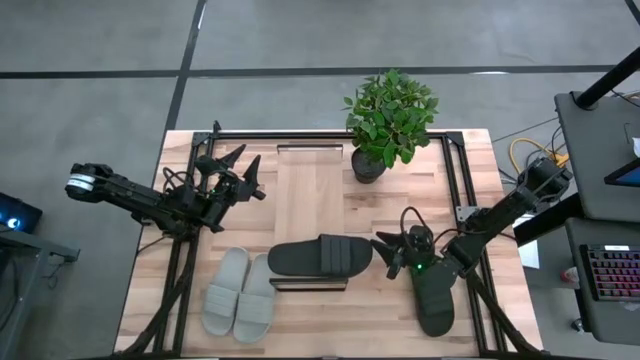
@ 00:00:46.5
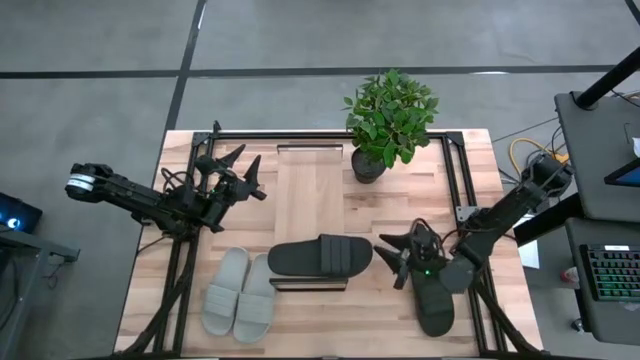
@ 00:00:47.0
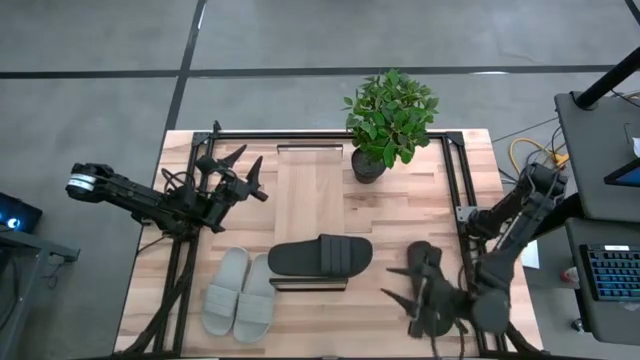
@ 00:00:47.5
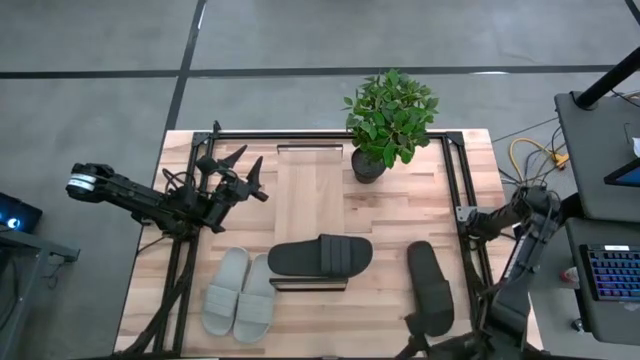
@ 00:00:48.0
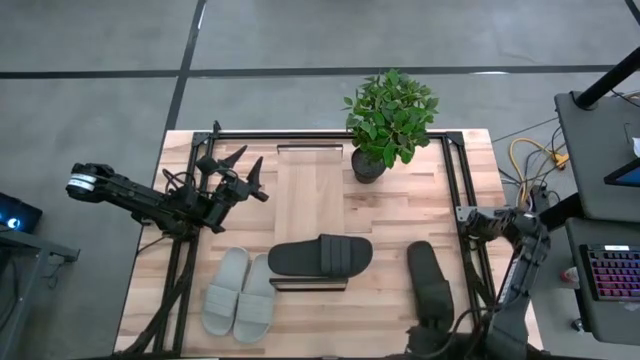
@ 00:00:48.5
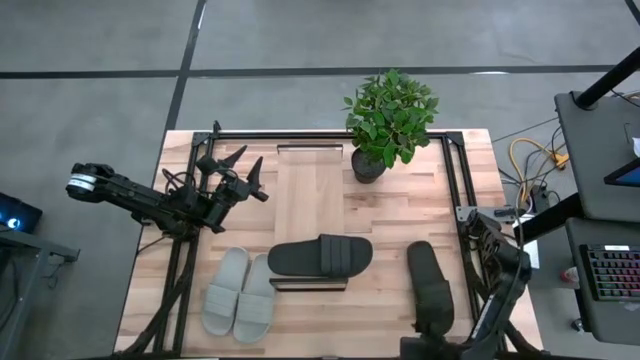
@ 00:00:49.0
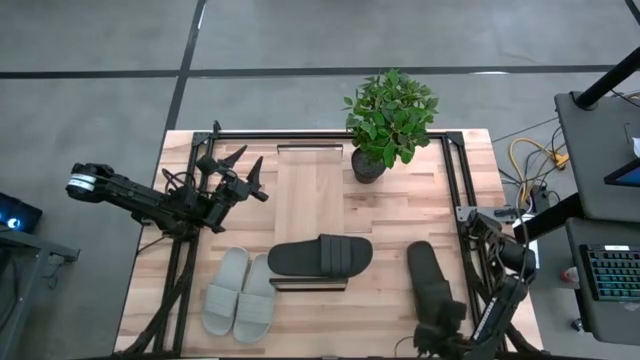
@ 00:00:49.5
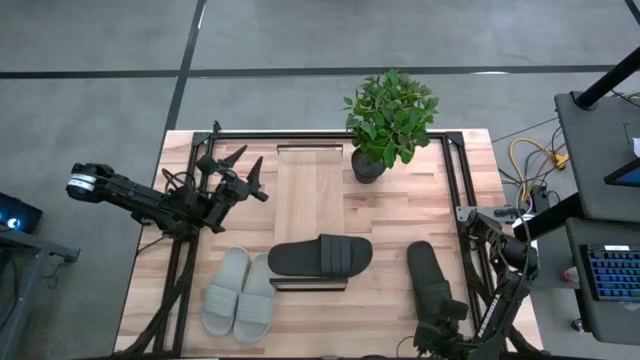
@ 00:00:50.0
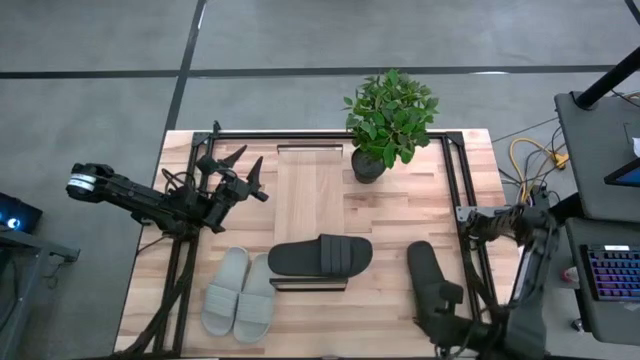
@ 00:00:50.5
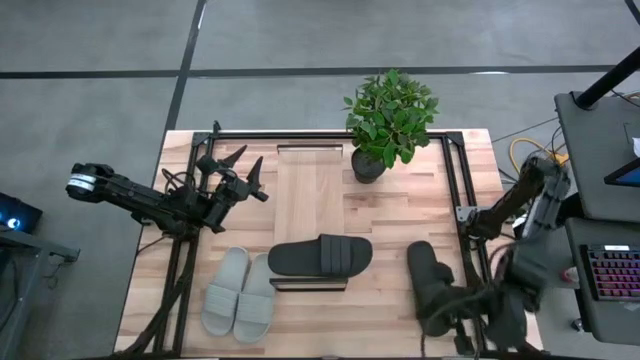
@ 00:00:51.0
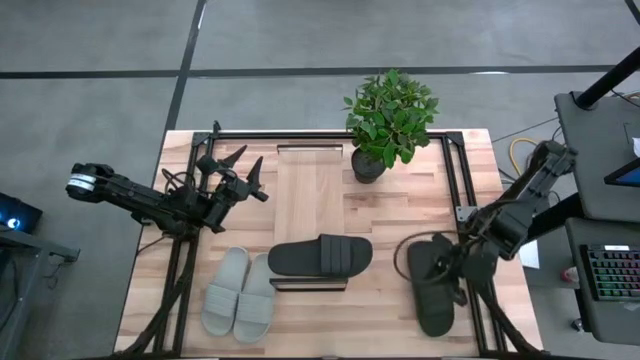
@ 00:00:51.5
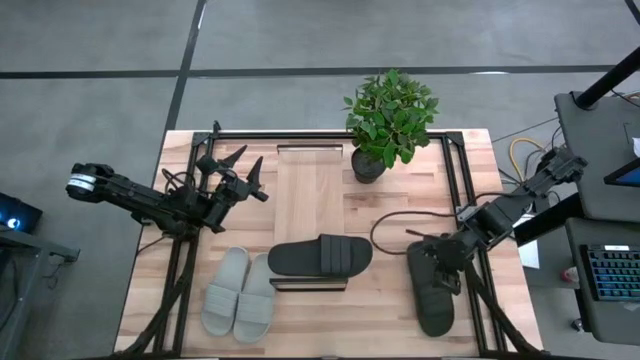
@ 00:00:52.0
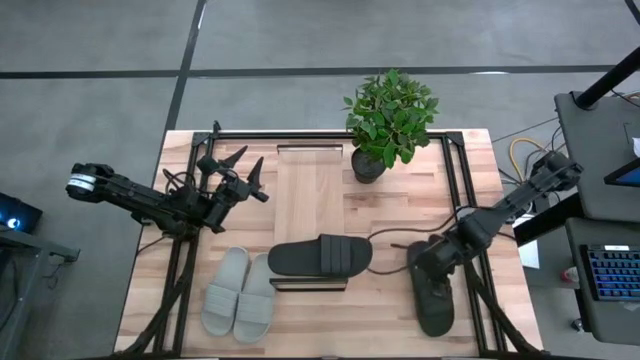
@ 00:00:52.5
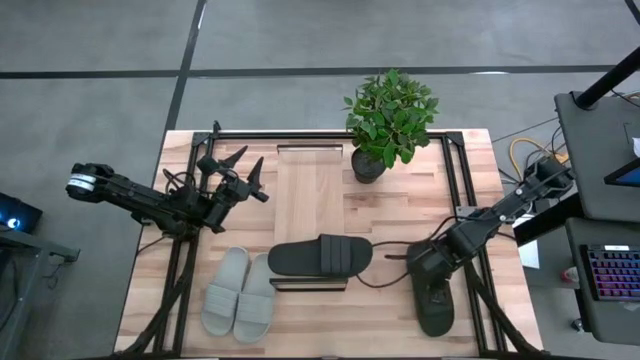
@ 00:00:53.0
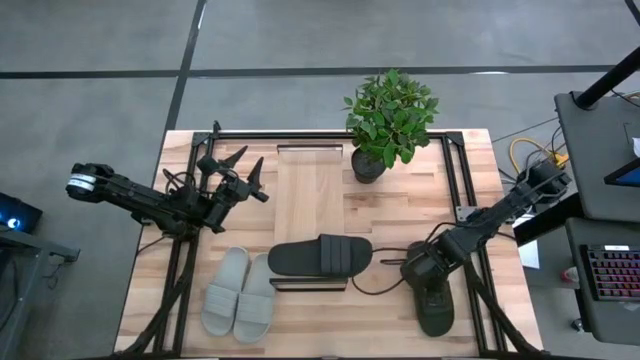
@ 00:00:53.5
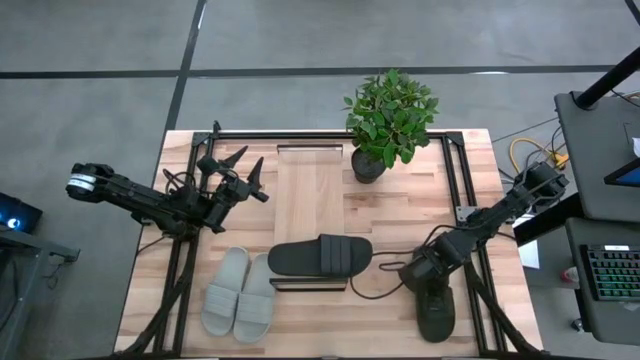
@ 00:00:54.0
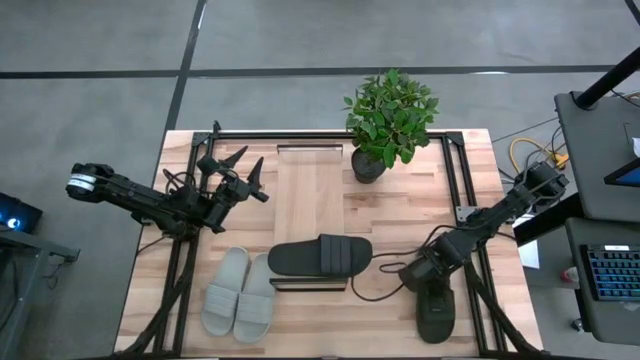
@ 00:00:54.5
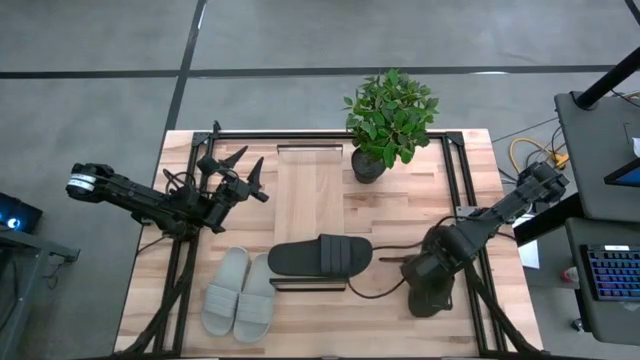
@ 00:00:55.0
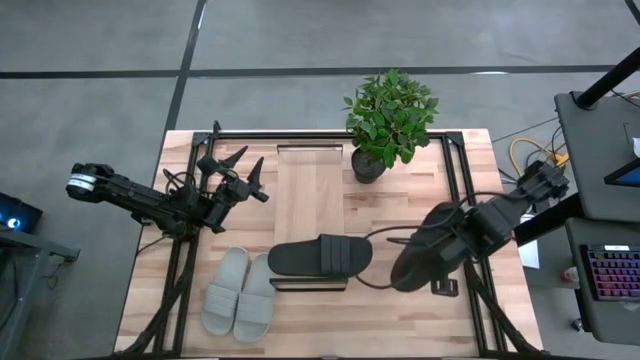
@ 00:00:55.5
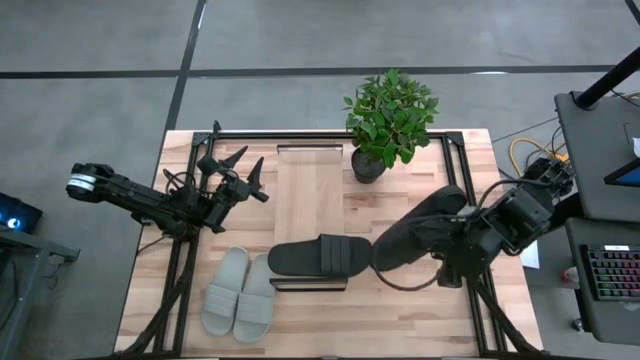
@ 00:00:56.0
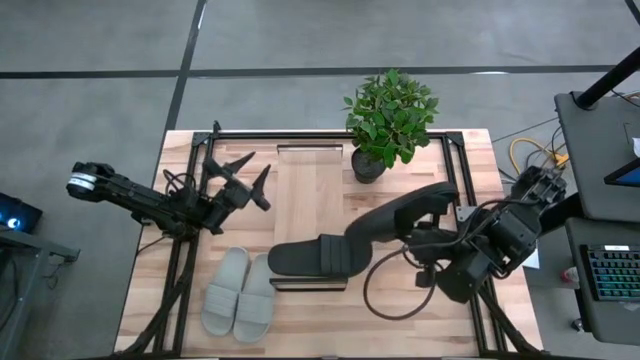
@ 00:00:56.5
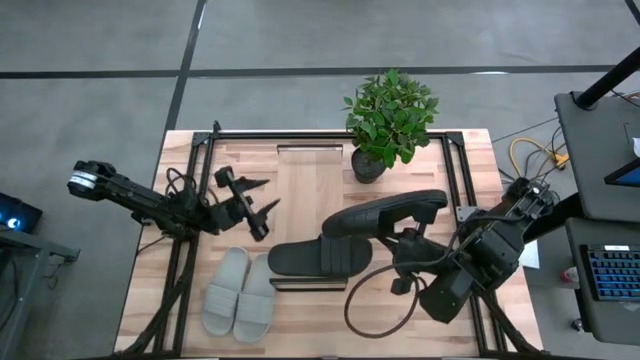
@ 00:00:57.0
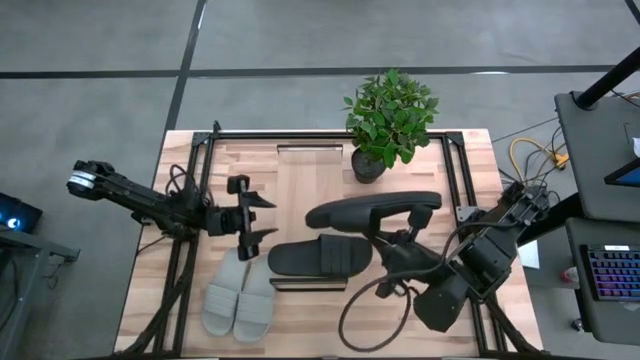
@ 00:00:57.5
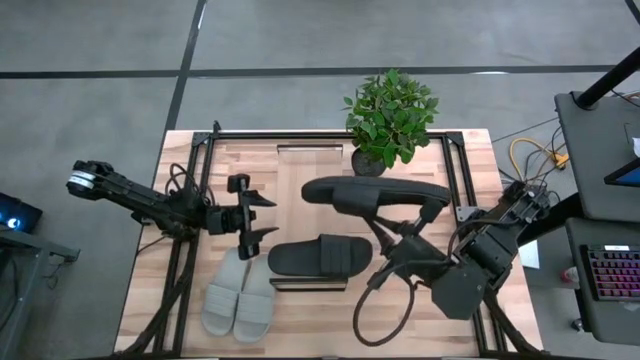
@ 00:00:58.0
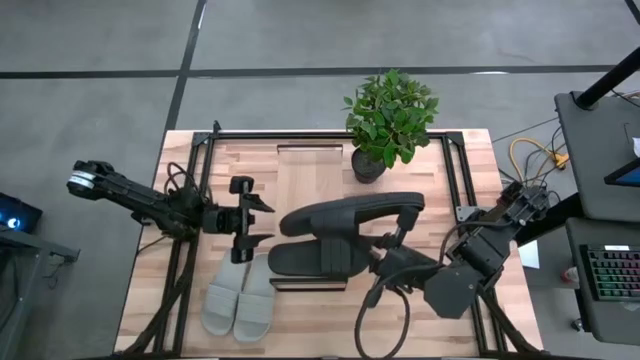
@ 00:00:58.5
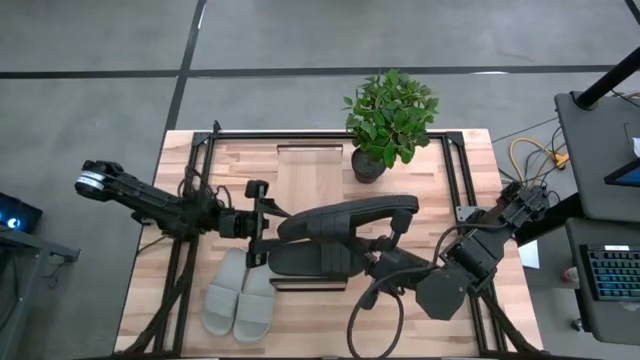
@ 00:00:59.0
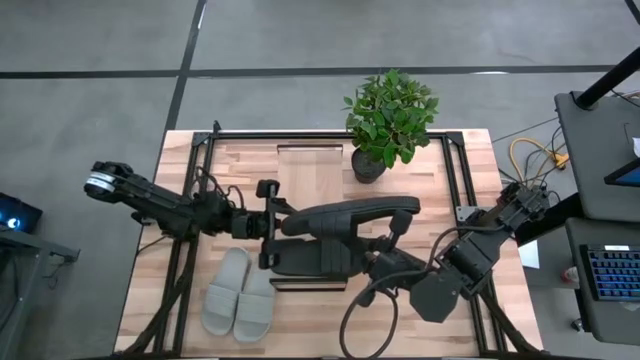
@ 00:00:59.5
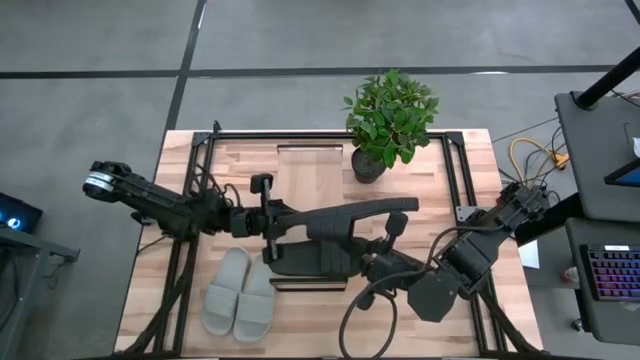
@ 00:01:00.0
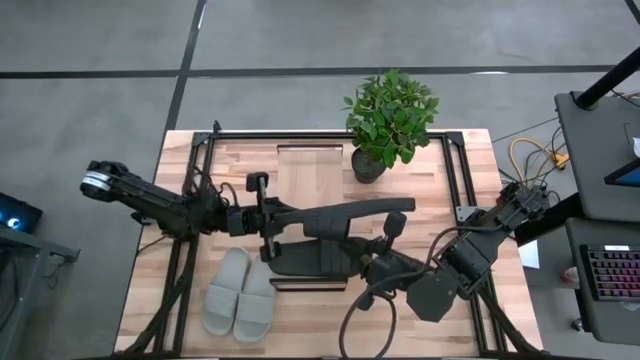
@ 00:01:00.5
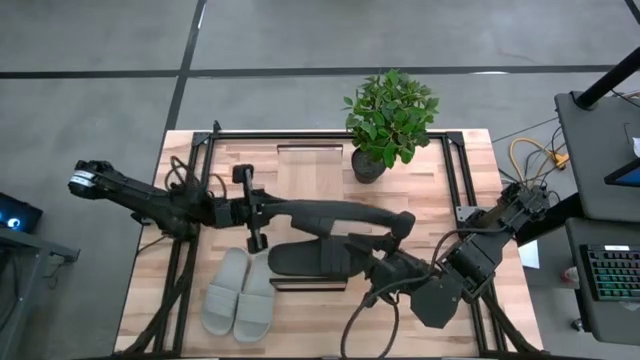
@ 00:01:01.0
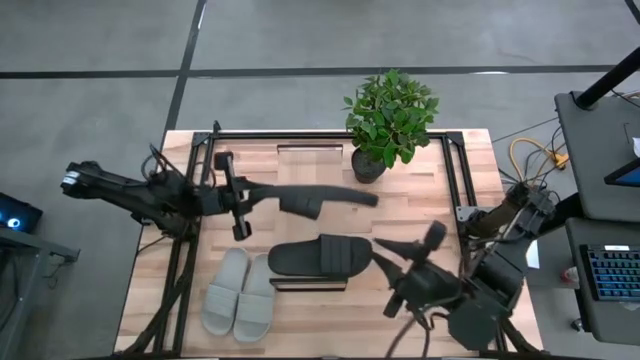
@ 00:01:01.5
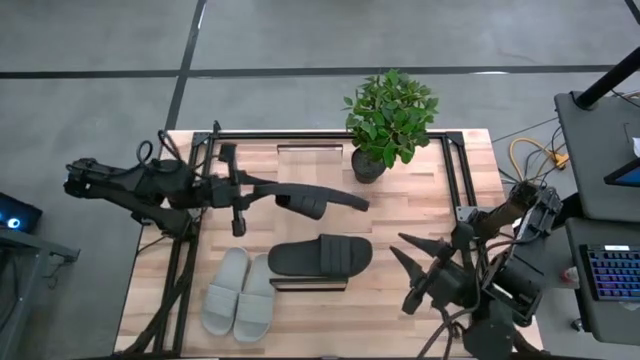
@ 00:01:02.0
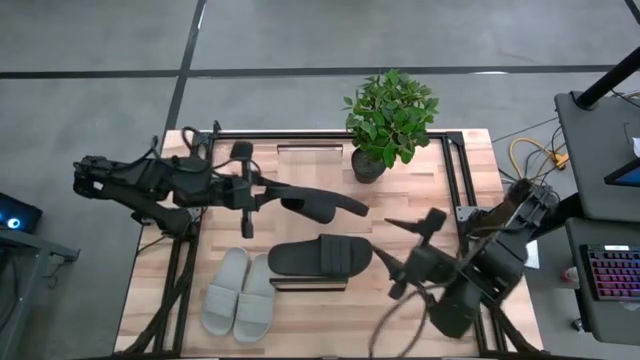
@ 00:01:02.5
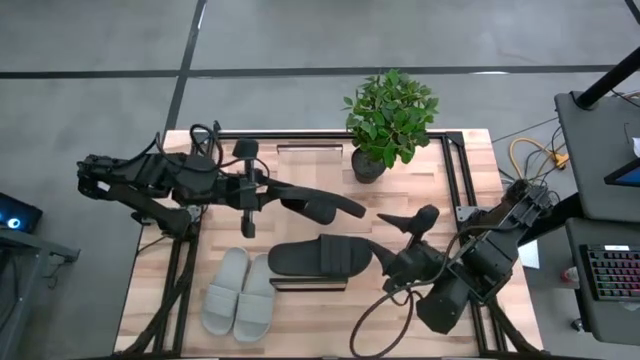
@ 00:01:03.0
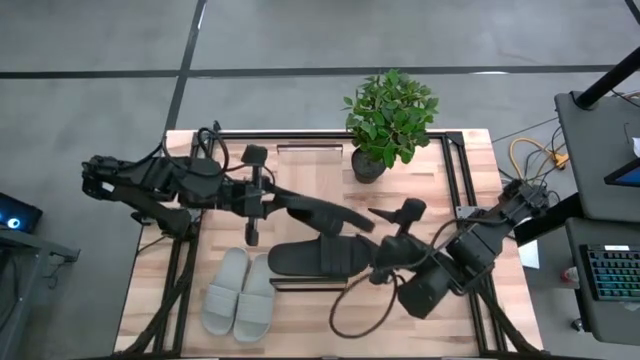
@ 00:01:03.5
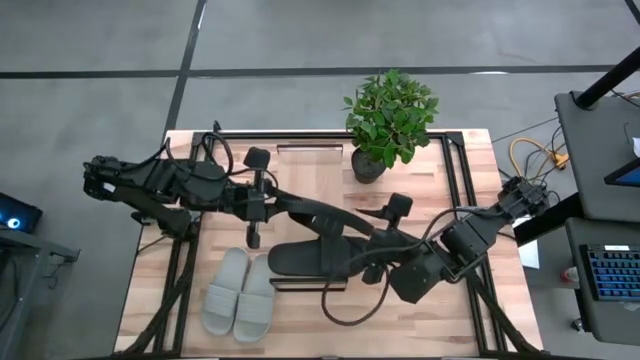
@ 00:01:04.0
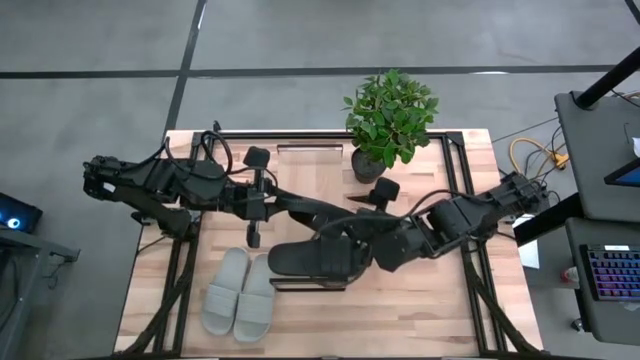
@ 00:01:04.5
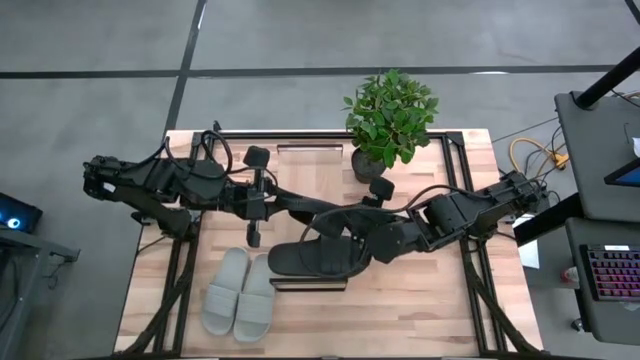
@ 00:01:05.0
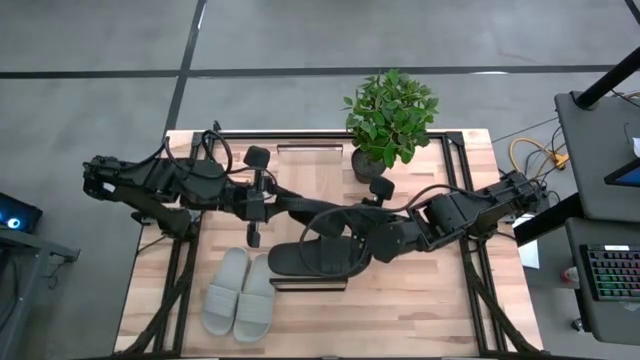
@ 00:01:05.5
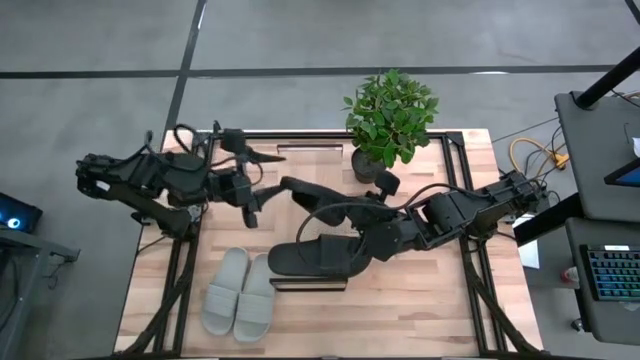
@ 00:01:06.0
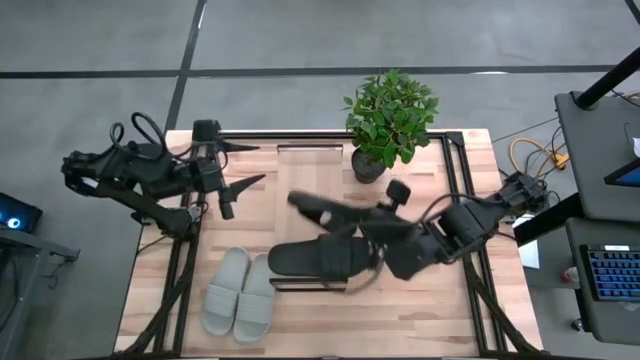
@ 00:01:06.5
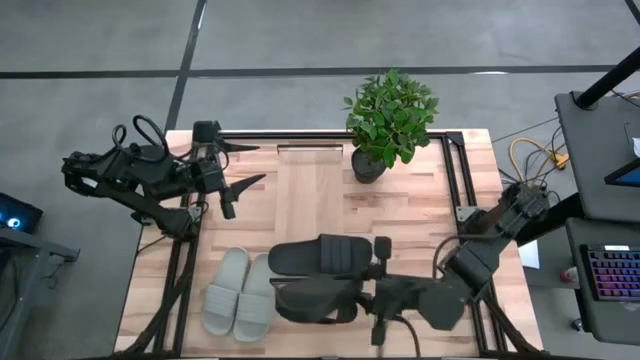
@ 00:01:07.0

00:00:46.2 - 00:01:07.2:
Task: Pick and place slides into the shelf
Put the black slipper on the shelf
